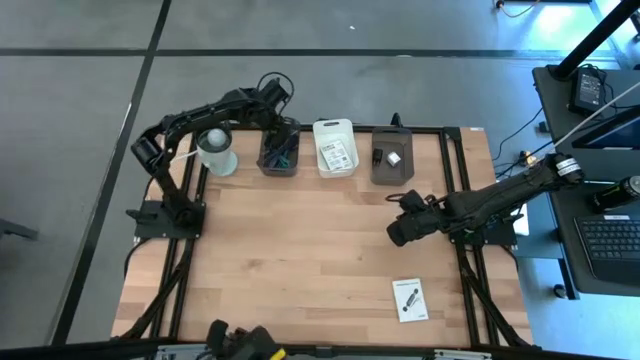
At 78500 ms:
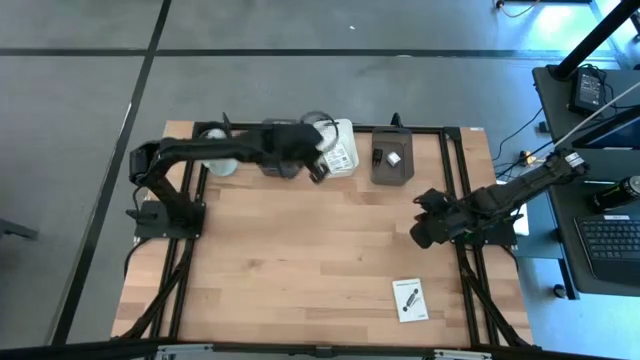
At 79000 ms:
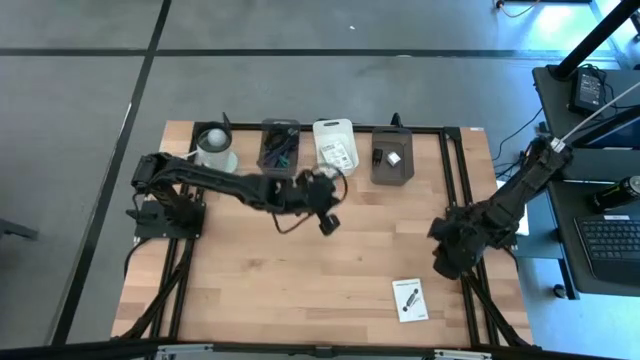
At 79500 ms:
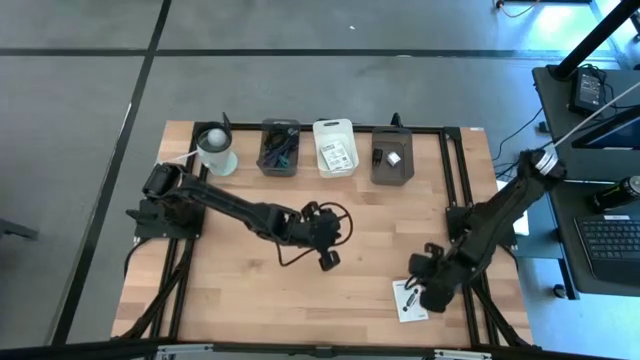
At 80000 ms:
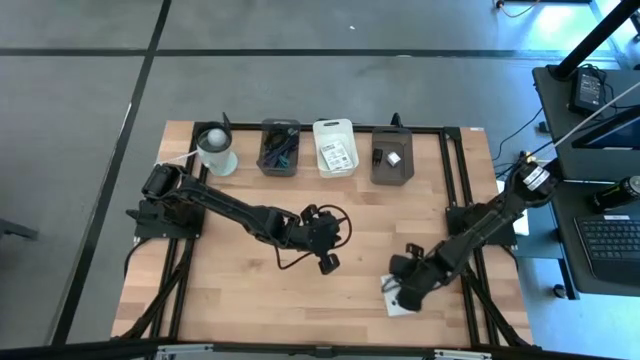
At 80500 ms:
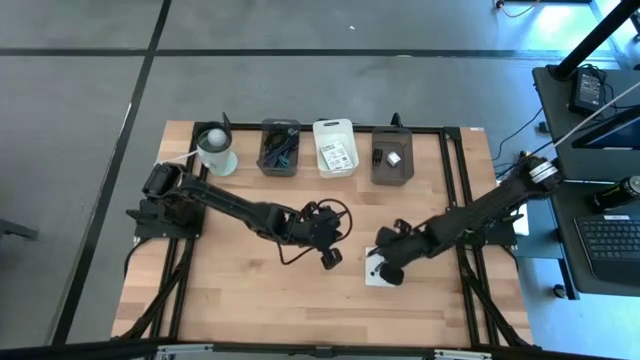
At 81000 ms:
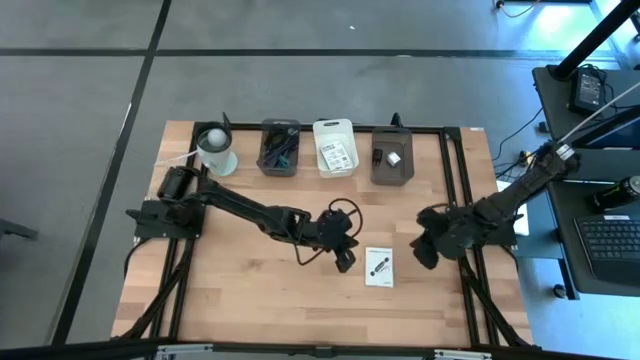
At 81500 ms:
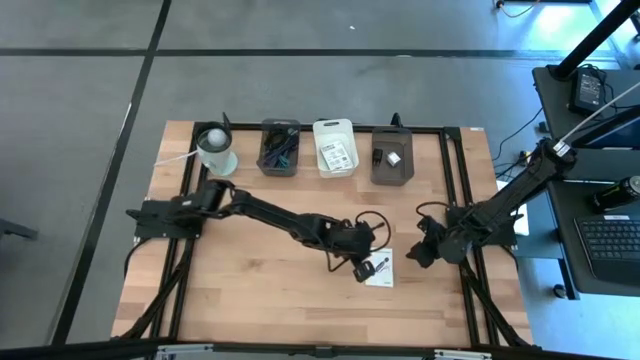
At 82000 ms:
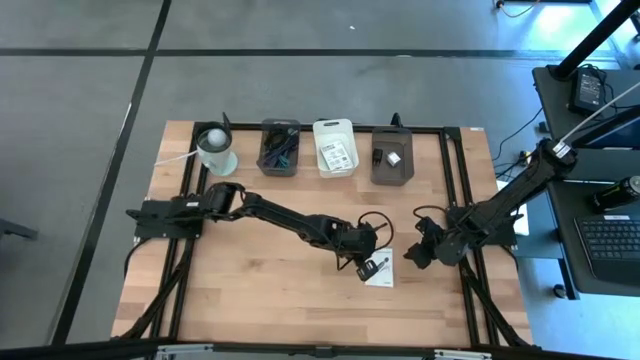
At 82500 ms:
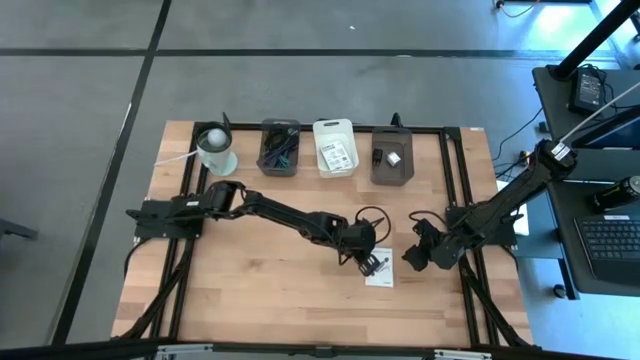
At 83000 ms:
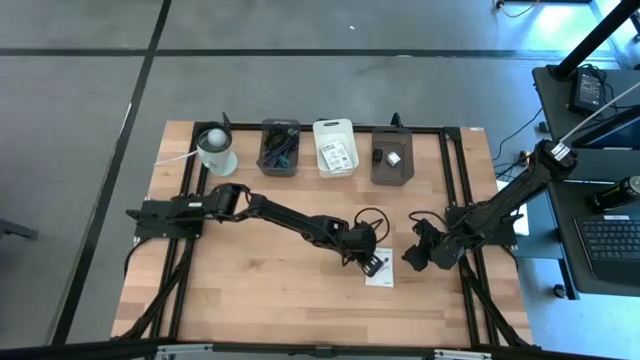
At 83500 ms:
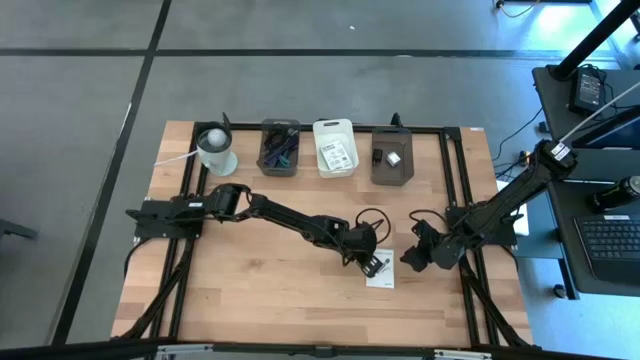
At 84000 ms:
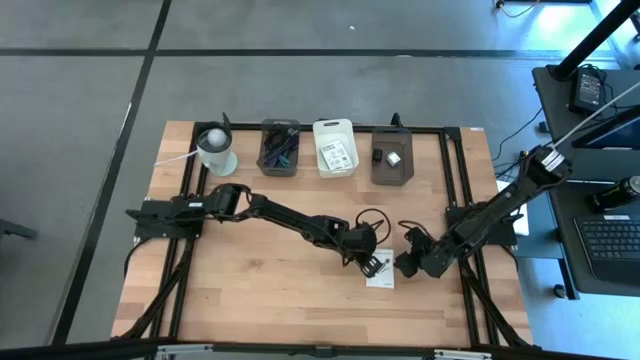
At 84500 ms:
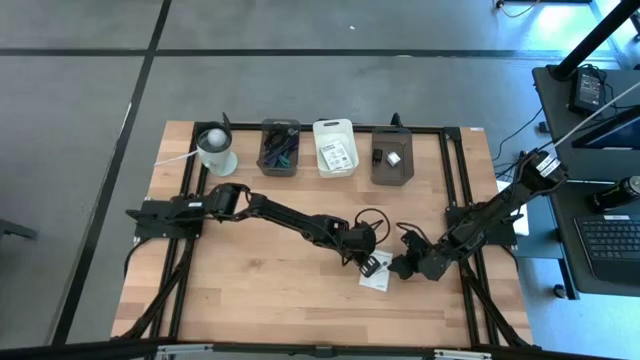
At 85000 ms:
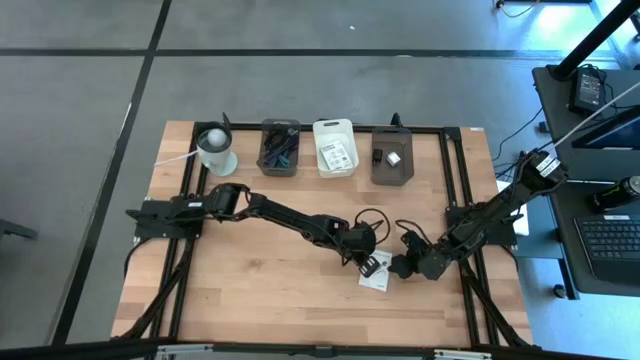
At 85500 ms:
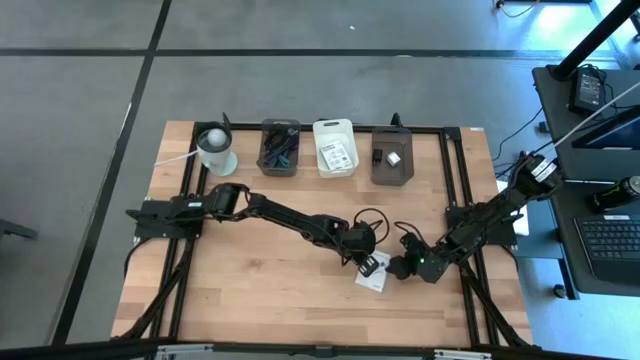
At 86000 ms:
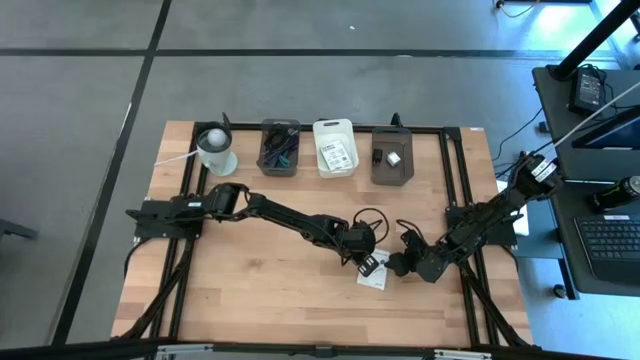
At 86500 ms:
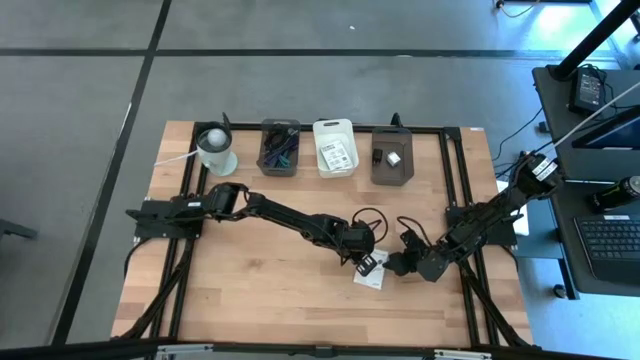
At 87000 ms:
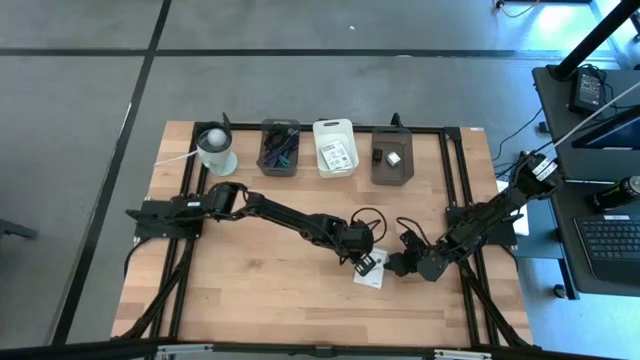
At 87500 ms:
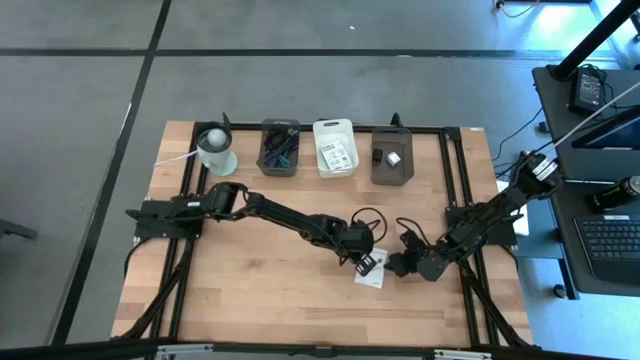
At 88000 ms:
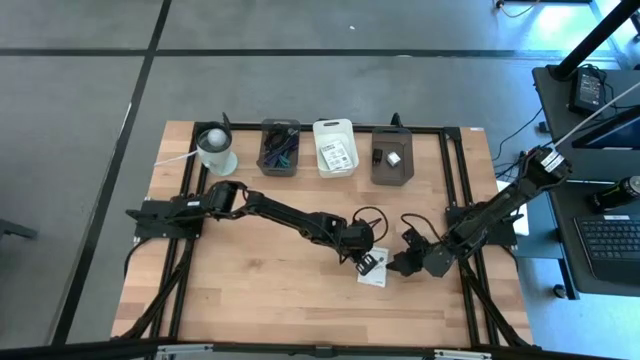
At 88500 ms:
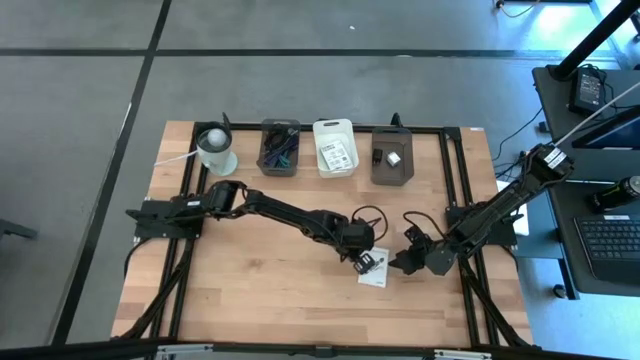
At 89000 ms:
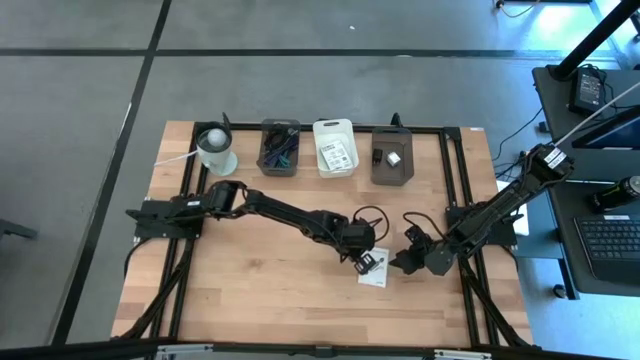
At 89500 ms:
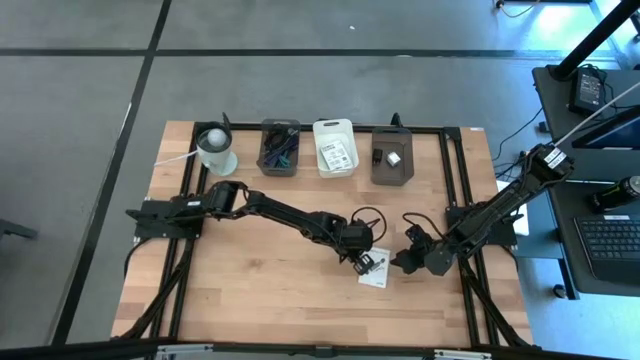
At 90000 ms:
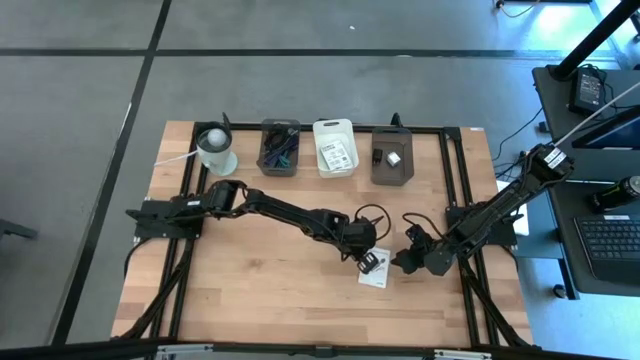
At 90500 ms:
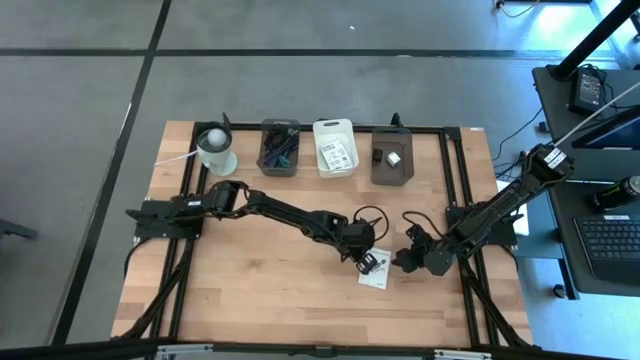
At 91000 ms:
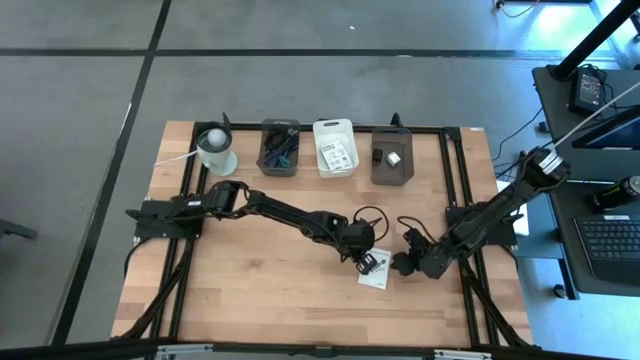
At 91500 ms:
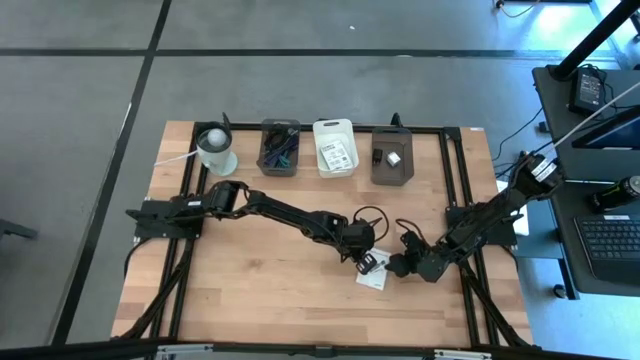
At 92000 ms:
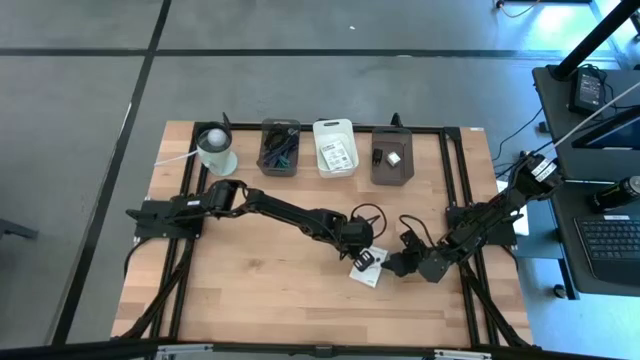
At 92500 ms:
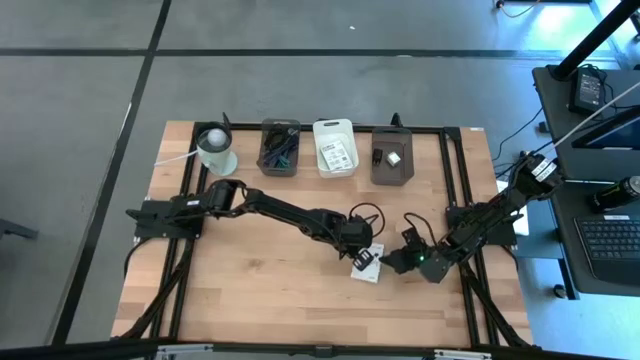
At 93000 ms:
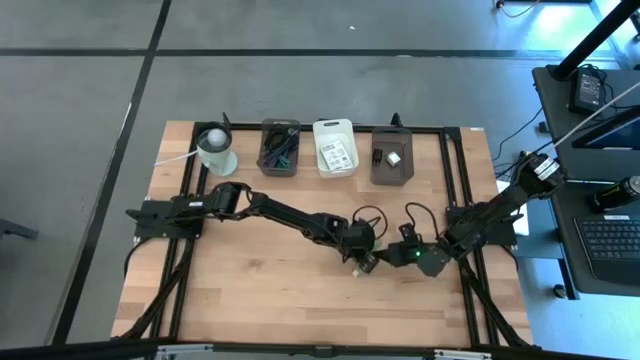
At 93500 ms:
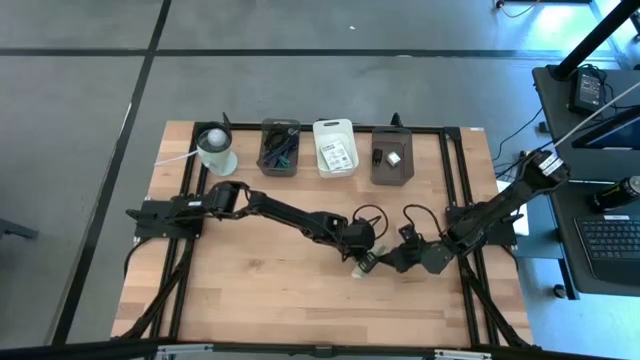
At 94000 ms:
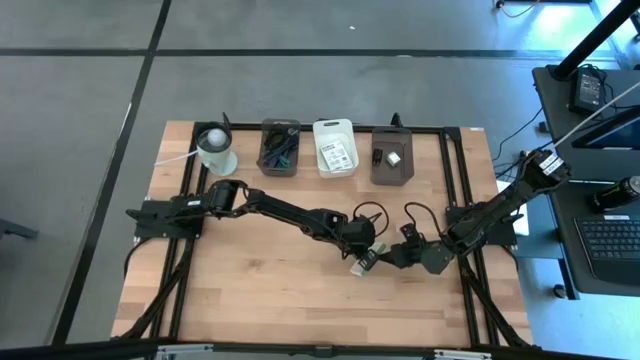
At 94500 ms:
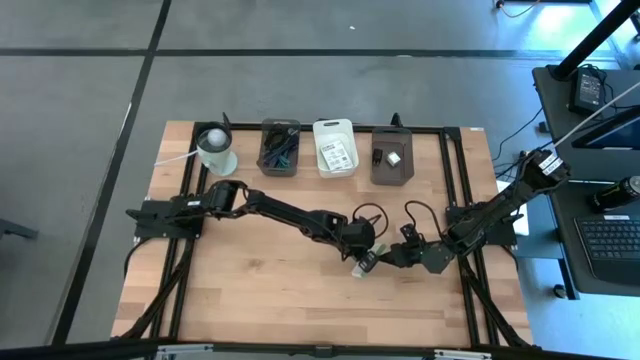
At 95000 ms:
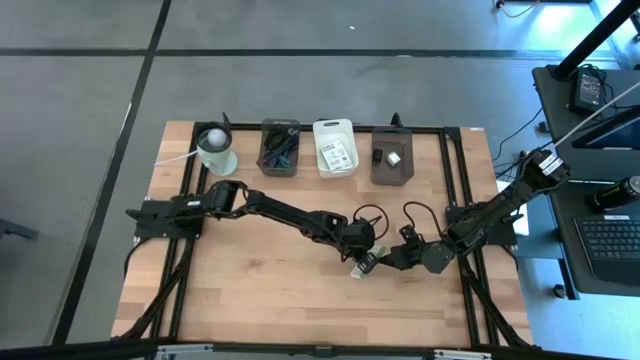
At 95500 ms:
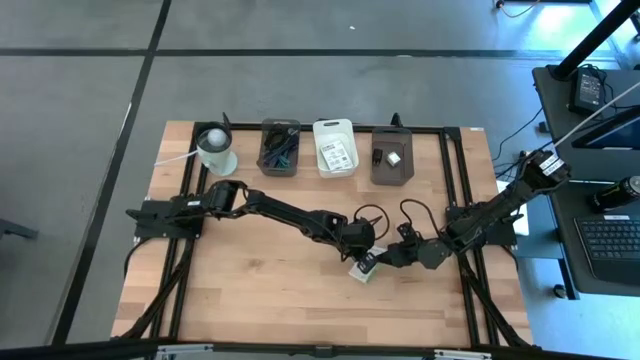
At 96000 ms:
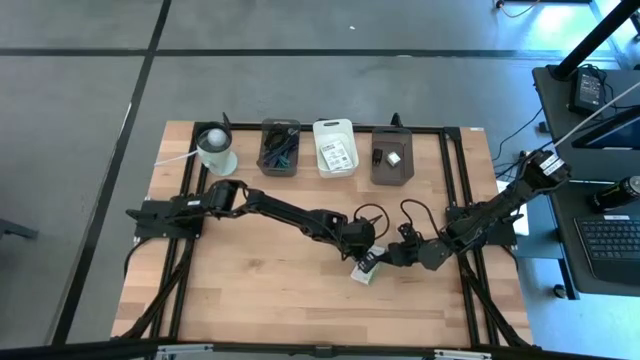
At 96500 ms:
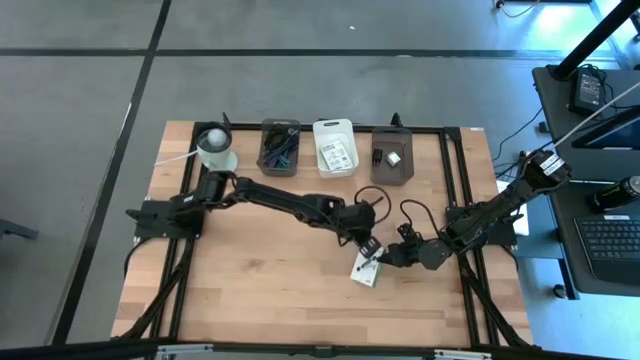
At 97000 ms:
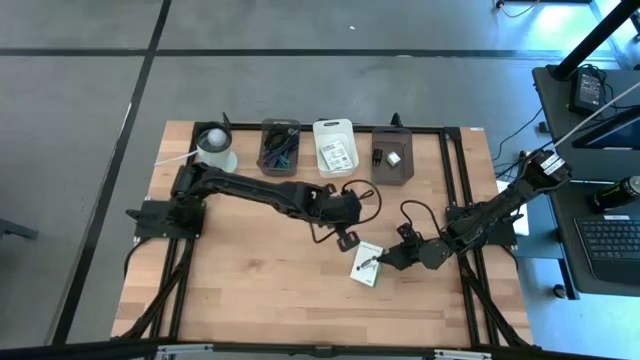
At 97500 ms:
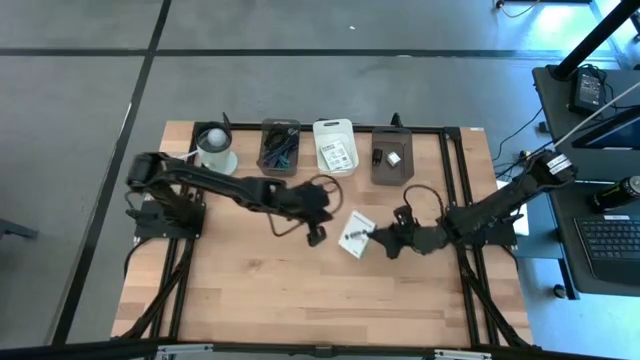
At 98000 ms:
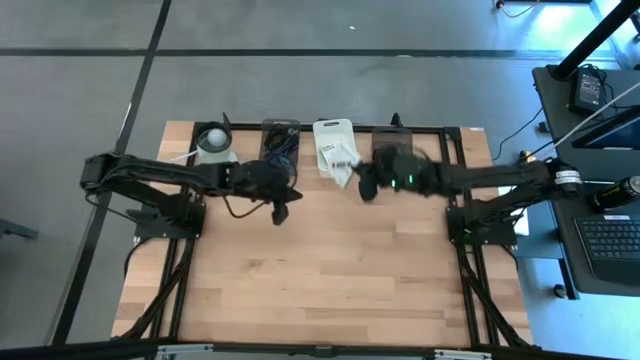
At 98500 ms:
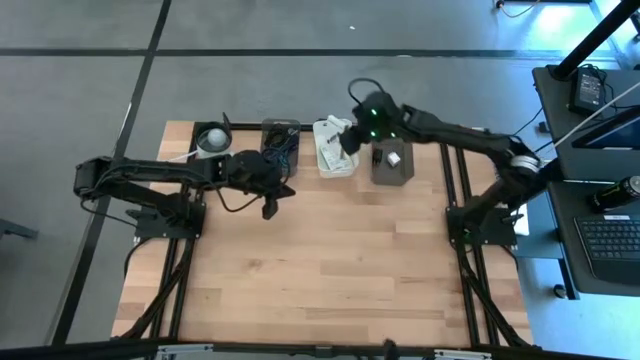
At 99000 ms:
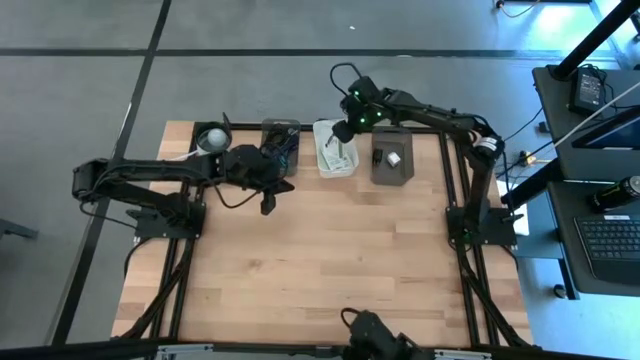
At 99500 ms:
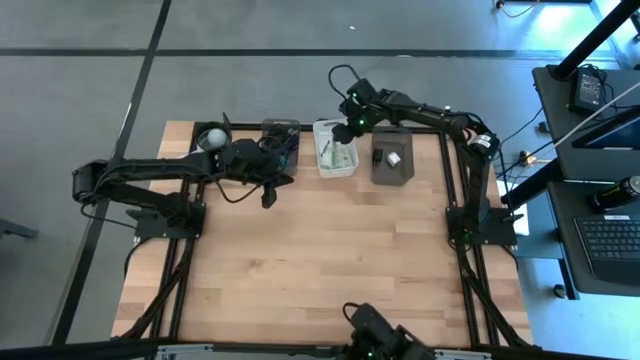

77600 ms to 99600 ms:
Task: Pick and place items into bin
Put the white card reader box into the white bin
